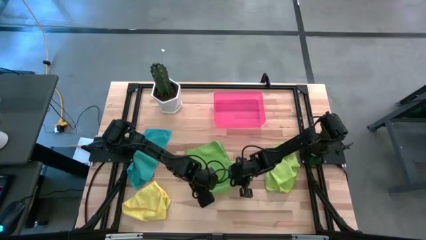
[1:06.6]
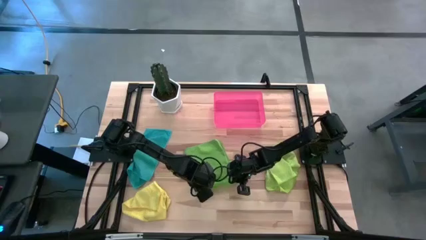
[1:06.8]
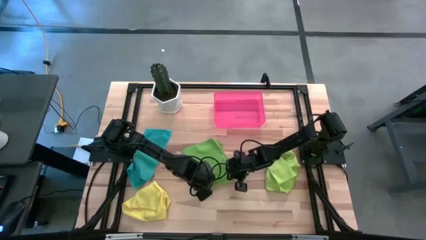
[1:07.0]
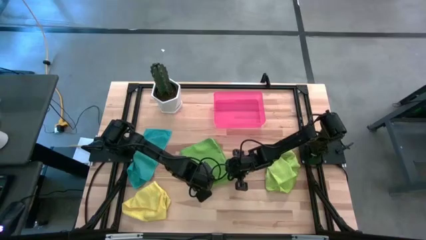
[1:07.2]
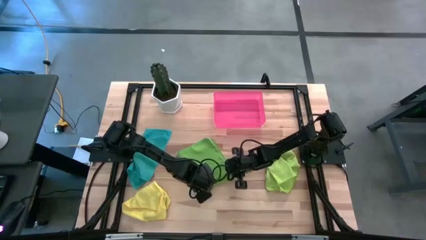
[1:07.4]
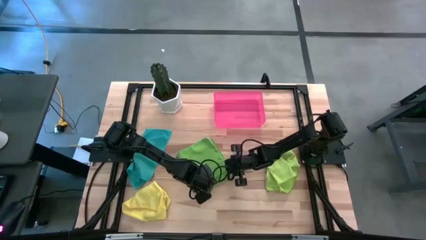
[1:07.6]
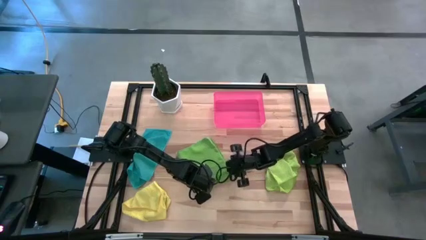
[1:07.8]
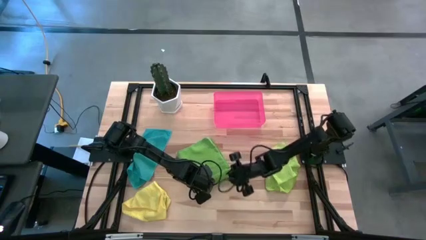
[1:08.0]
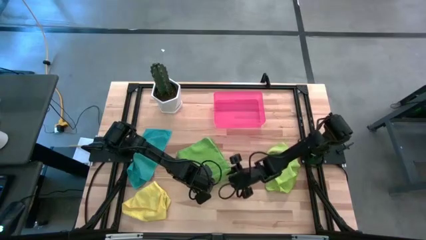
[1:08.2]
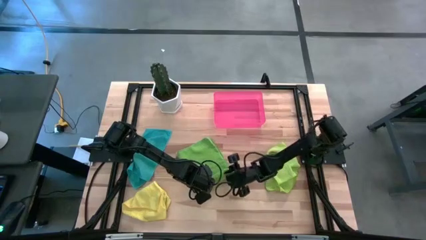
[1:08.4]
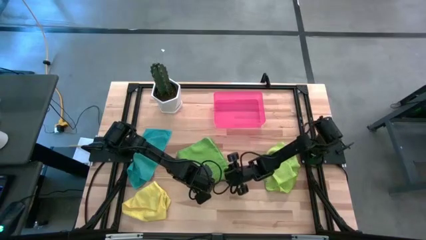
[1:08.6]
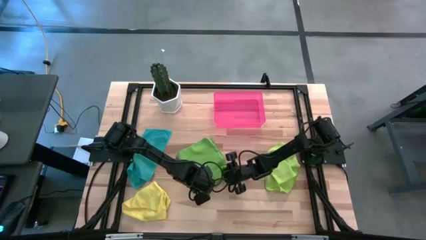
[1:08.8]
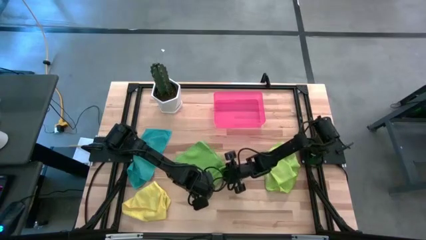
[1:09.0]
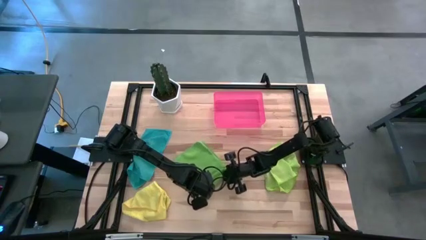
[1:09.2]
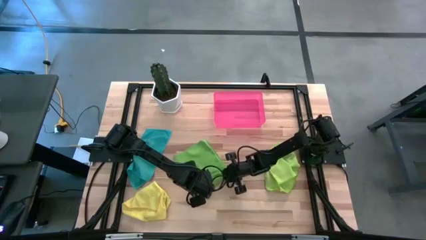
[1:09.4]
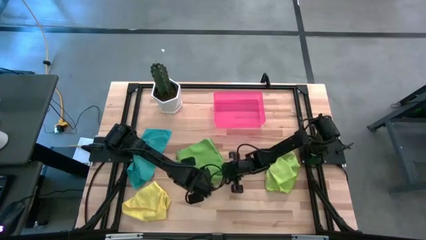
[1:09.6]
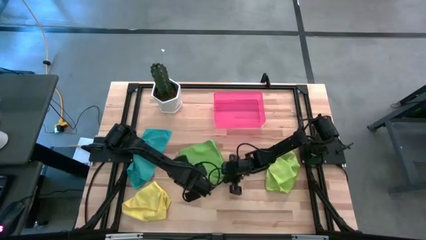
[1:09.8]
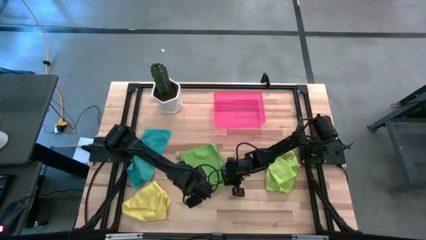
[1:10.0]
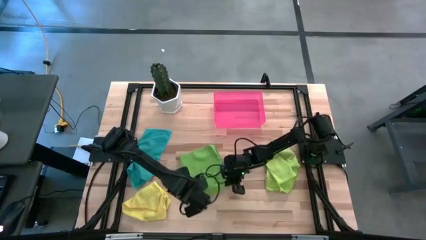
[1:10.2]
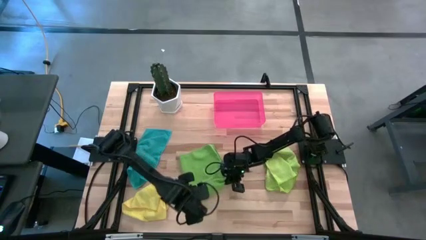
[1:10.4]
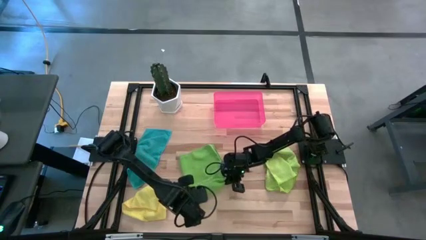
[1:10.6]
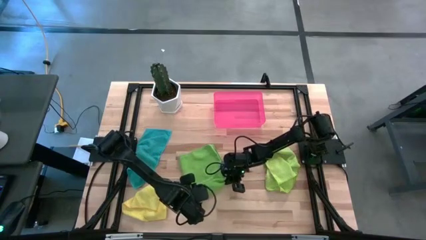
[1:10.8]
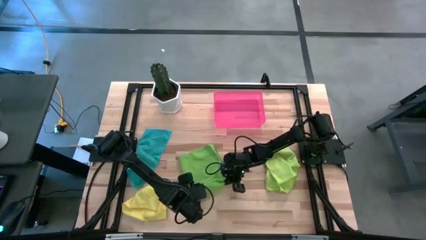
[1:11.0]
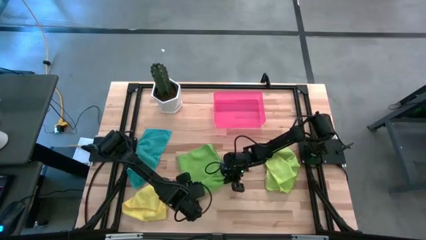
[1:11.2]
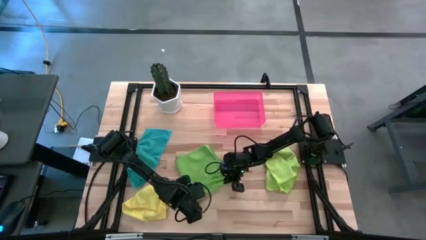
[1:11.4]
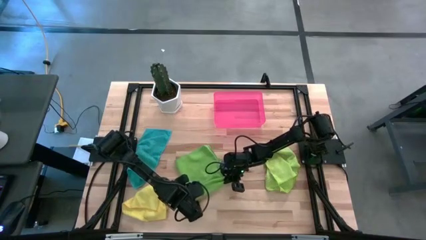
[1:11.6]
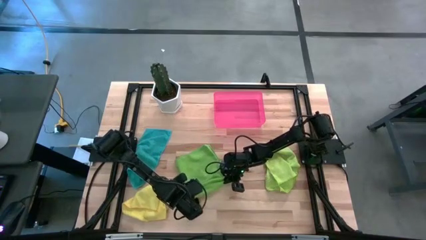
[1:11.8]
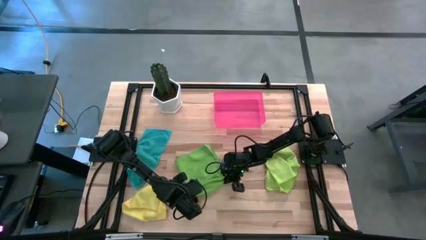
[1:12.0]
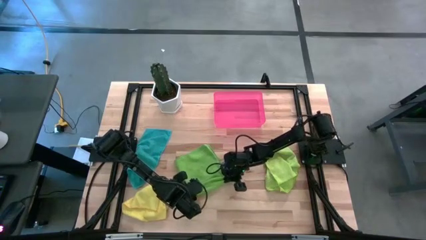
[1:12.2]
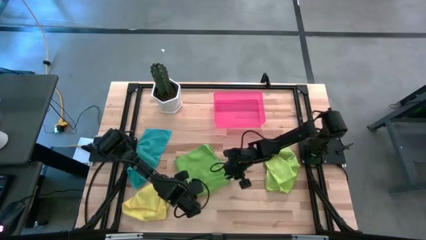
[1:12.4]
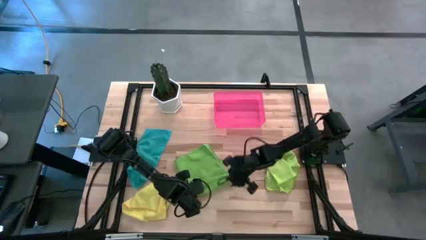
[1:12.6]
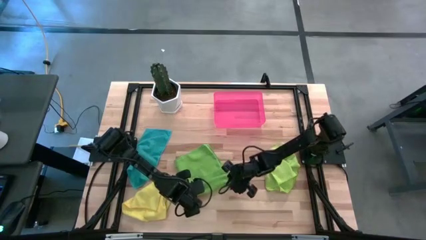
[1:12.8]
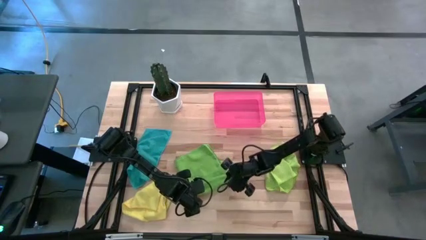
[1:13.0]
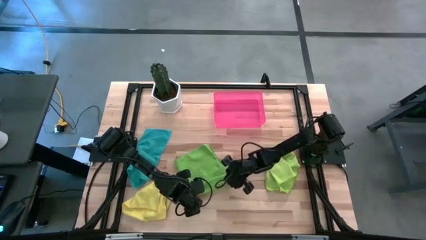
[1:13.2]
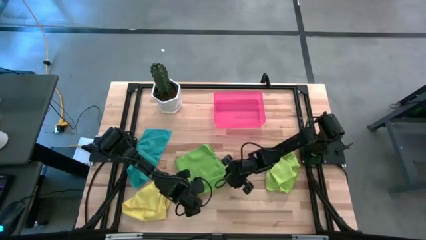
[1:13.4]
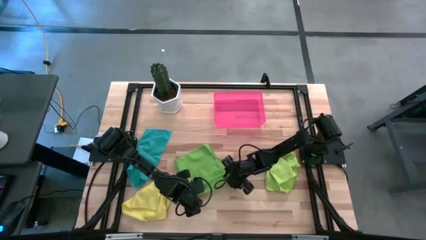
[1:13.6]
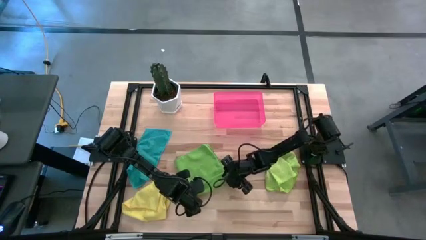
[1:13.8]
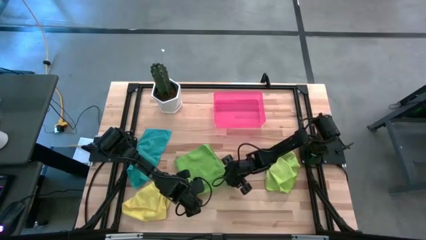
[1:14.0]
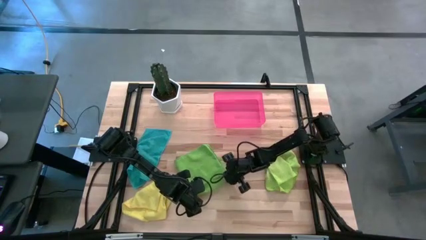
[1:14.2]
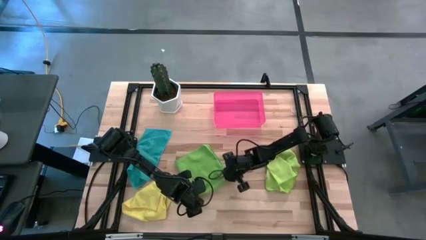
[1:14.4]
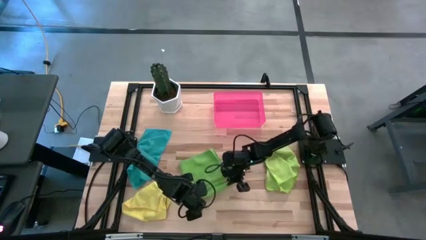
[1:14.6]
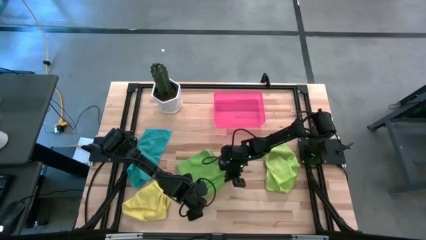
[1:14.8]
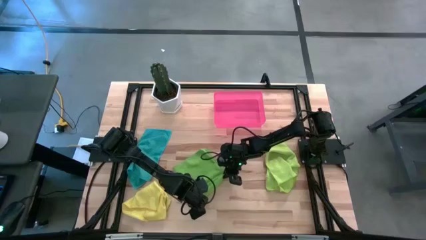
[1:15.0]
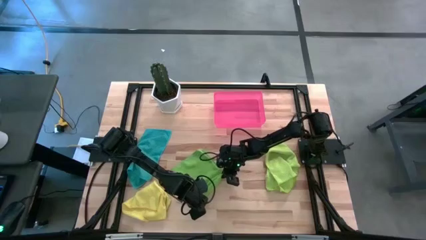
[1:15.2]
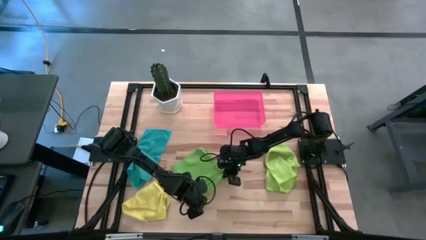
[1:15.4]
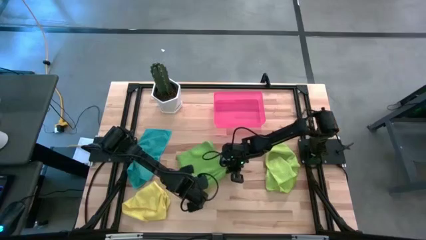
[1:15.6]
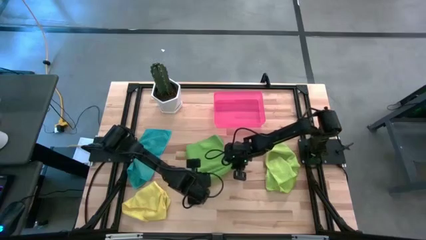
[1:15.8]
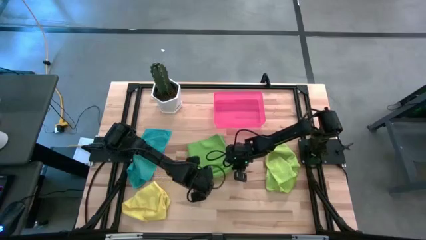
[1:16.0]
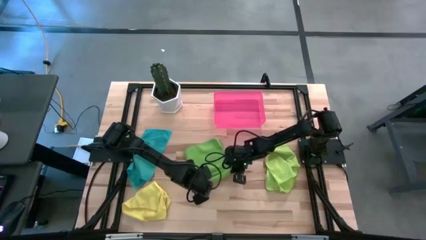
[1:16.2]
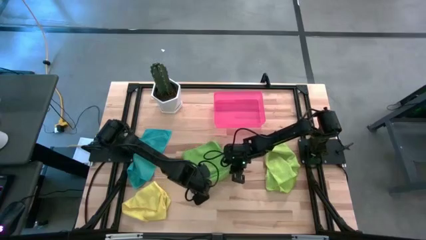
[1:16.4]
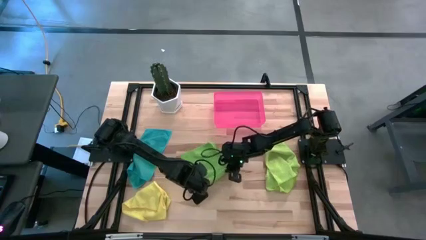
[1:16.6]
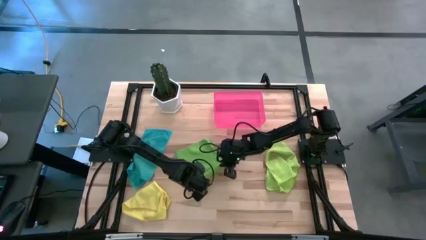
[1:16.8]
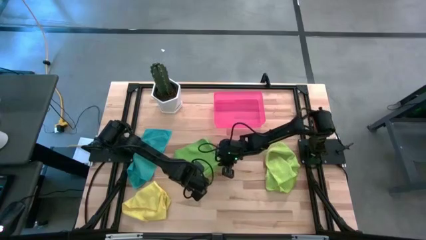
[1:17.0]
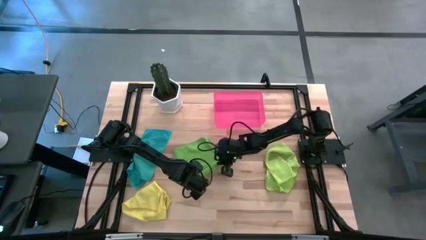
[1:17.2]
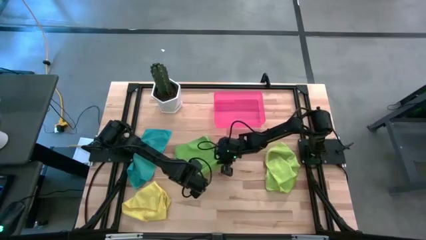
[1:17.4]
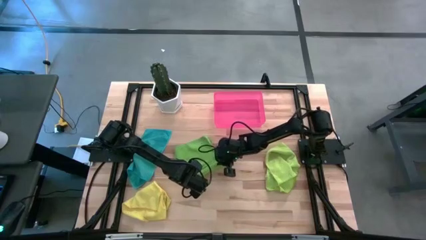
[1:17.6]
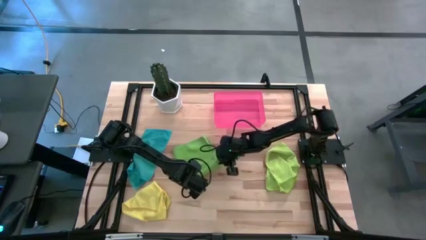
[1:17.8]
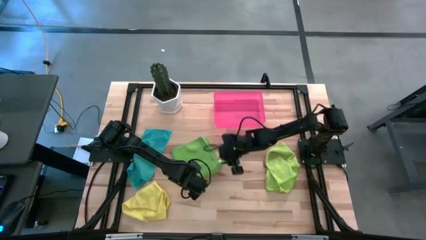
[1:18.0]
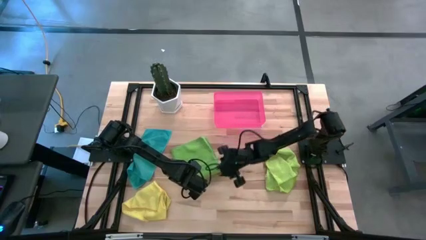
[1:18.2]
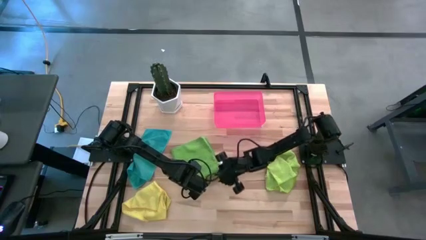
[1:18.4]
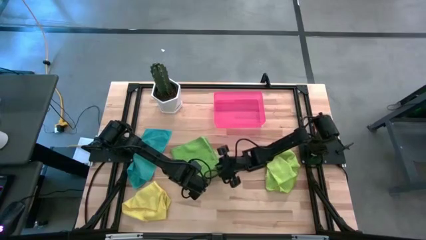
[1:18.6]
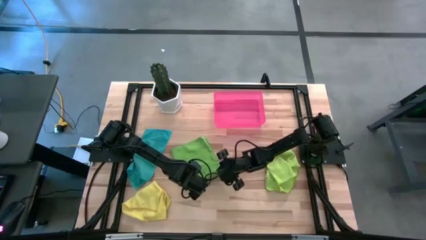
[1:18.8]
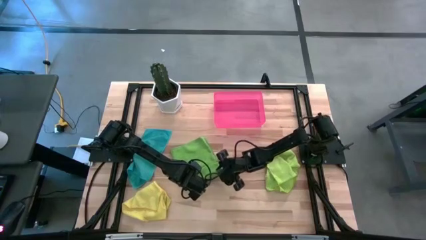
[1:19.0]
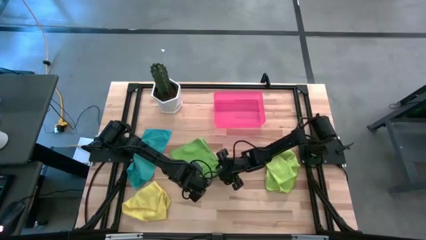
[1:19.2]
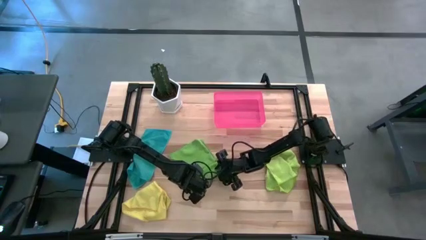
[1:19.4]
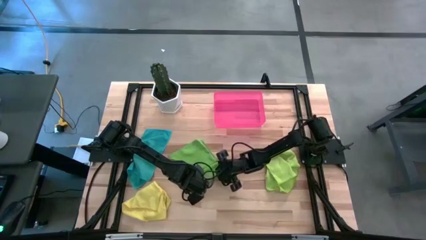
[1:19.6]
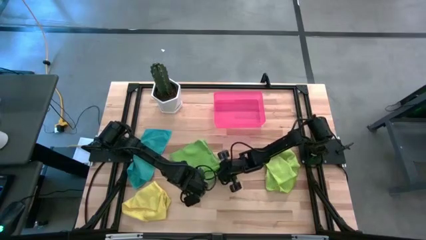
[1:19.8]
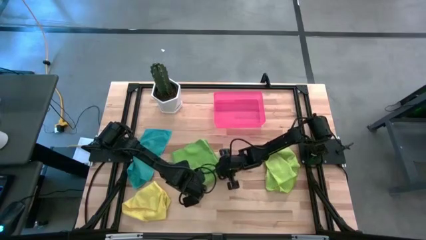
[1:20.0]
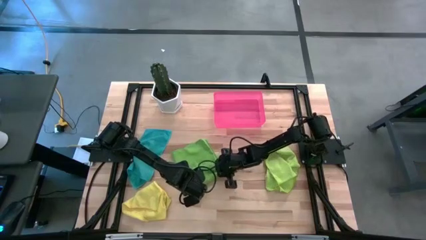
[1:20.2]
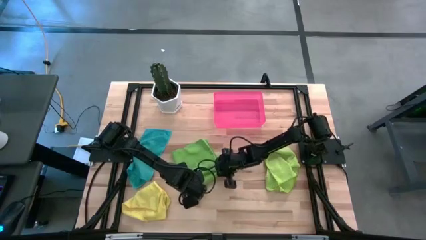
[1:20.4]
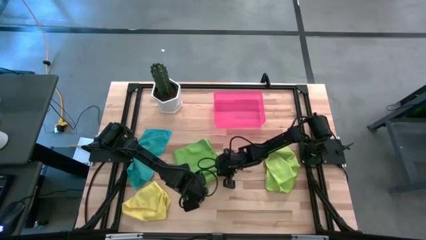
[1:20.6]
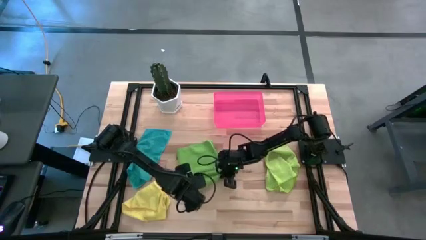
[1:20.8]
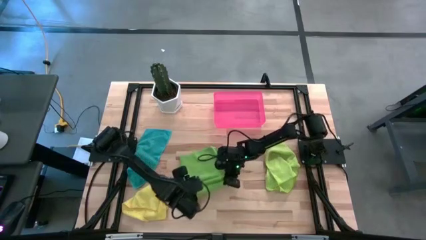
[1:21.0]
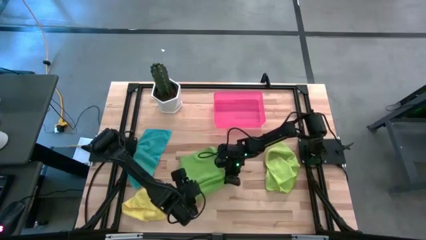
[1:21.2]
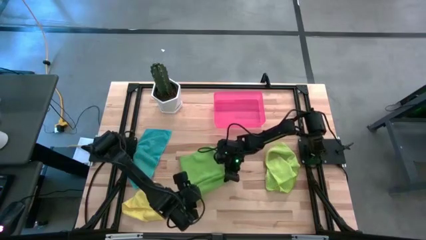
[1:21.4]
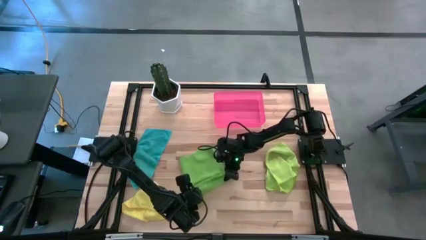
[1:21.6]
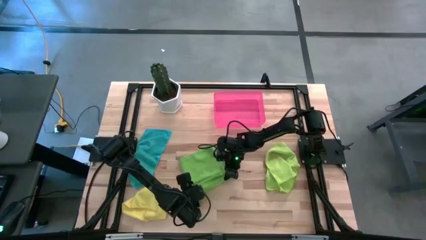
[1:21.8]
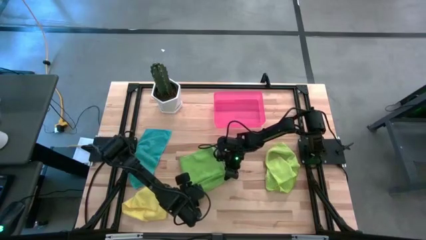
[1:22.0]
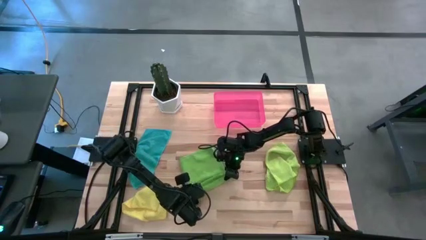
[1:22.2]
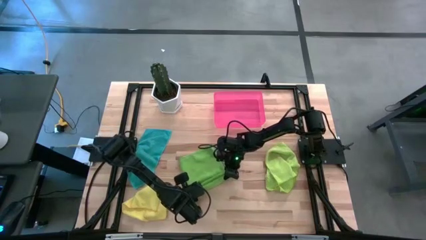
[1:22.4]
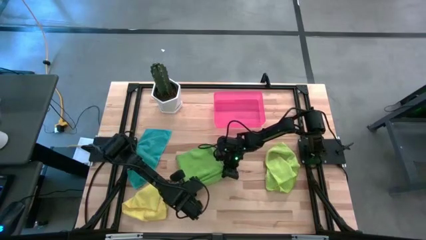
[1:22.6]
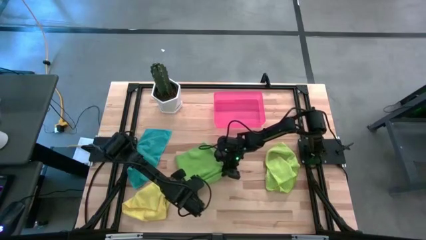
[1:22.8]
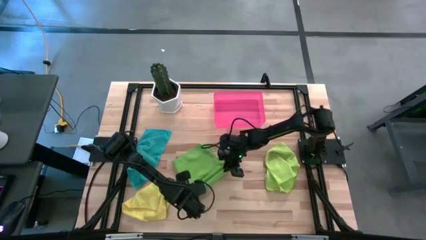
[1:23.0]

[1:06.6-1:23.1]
Task: Roll microfiber towels into tight, uniform cylinder then place into a basket
Roll the green microfiber cloth
